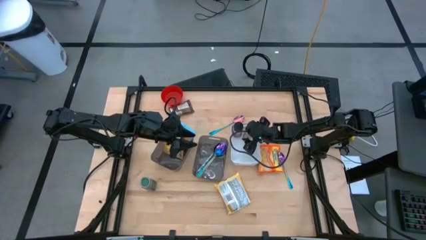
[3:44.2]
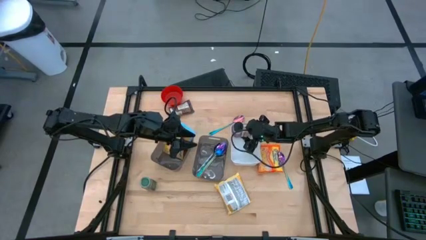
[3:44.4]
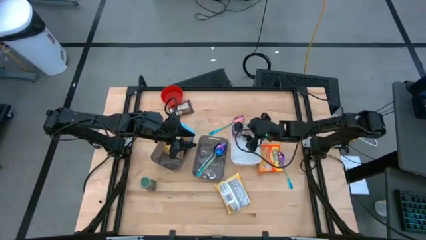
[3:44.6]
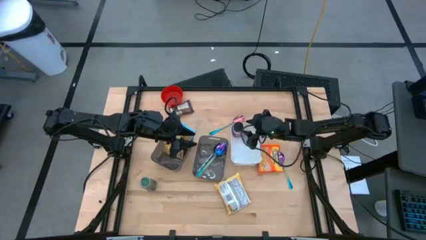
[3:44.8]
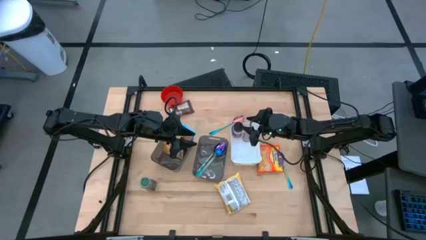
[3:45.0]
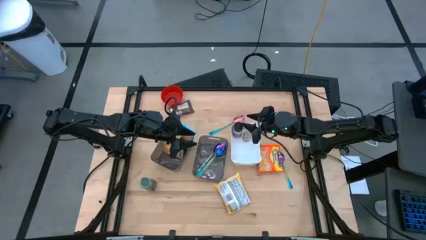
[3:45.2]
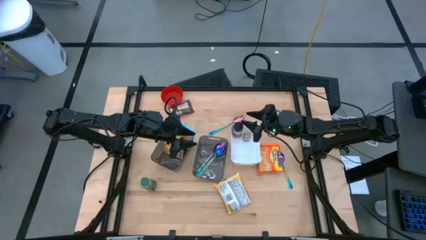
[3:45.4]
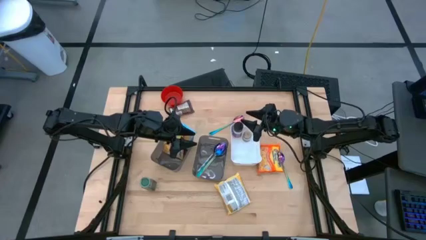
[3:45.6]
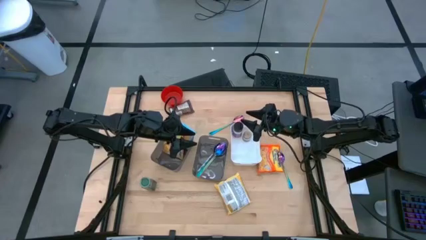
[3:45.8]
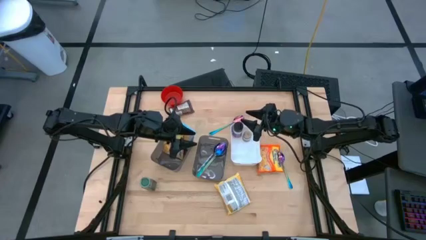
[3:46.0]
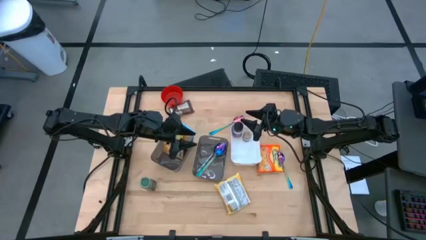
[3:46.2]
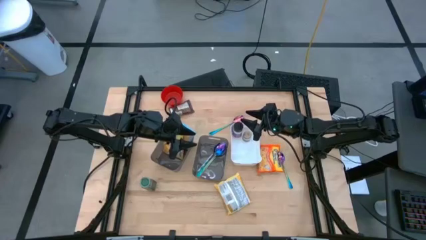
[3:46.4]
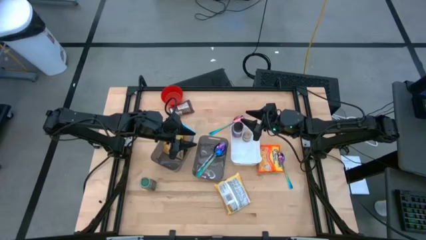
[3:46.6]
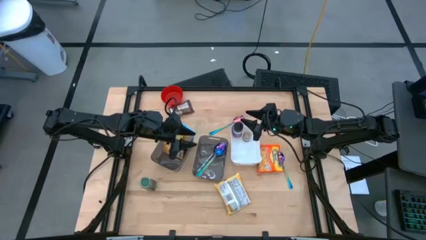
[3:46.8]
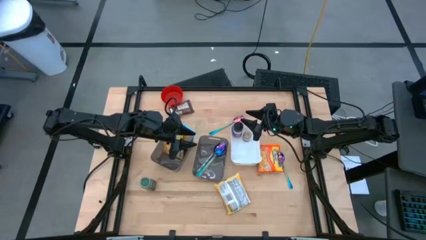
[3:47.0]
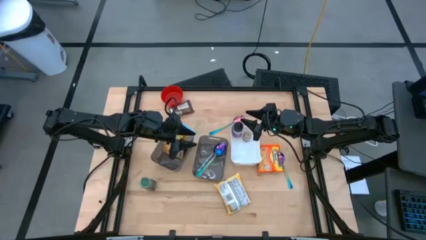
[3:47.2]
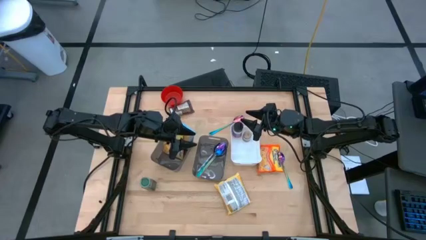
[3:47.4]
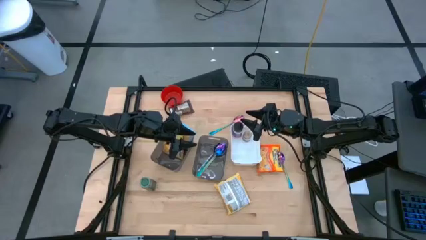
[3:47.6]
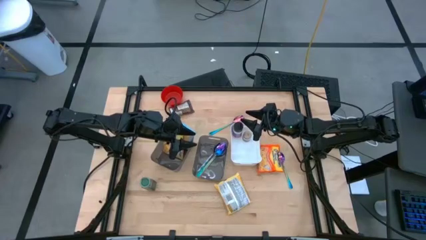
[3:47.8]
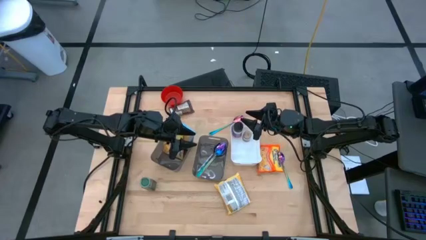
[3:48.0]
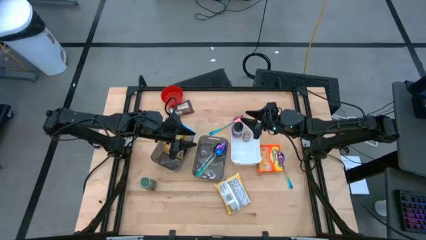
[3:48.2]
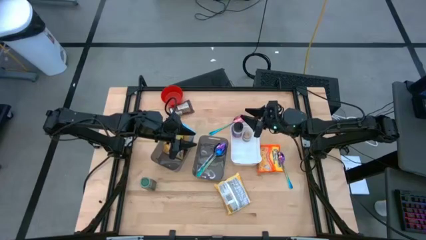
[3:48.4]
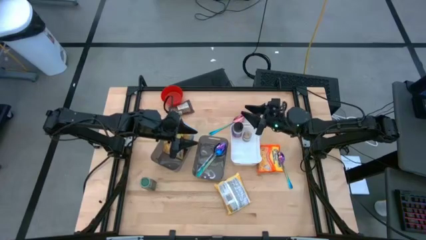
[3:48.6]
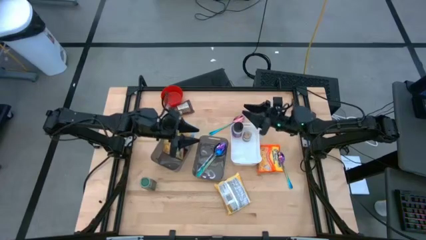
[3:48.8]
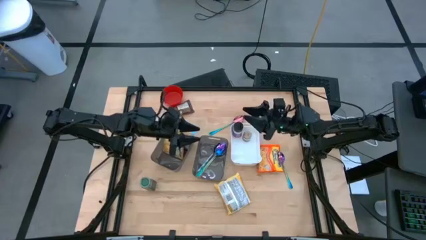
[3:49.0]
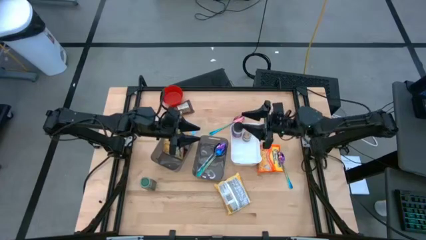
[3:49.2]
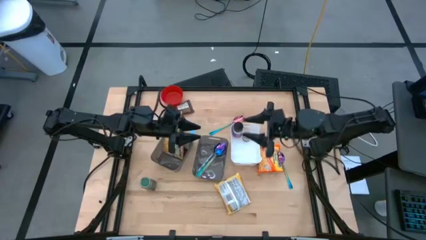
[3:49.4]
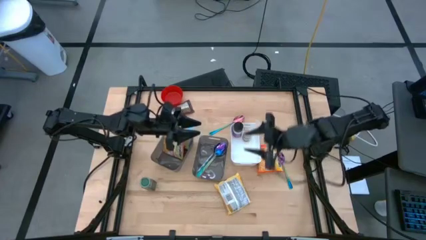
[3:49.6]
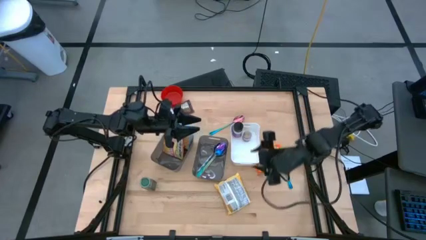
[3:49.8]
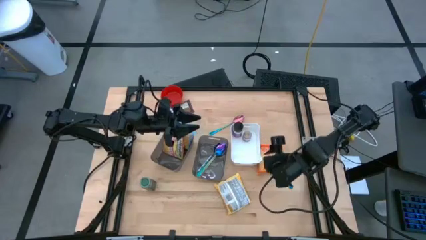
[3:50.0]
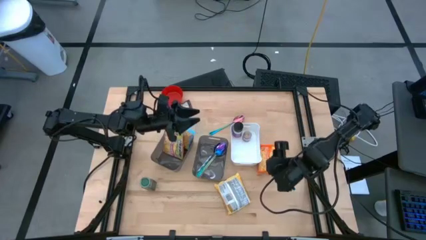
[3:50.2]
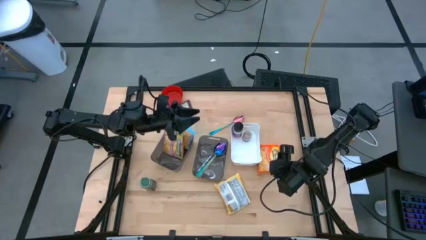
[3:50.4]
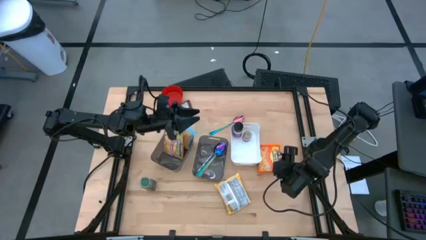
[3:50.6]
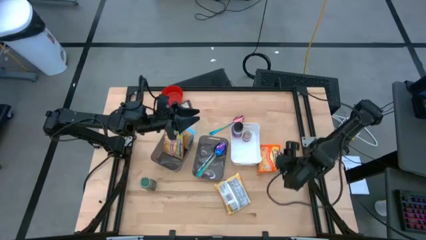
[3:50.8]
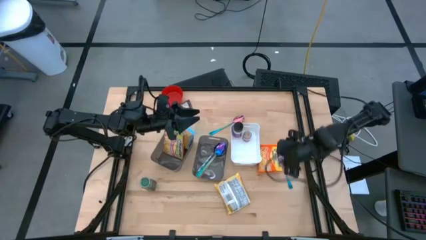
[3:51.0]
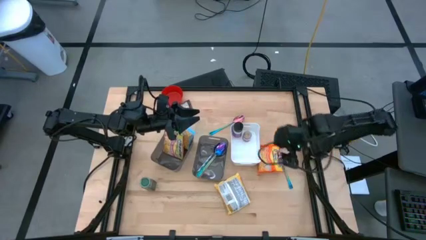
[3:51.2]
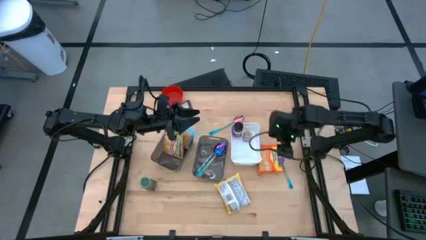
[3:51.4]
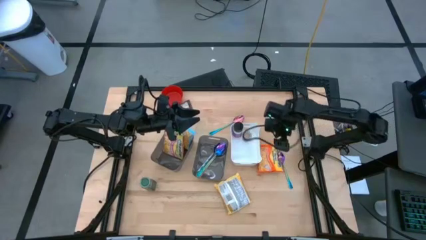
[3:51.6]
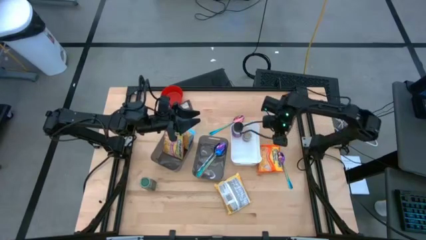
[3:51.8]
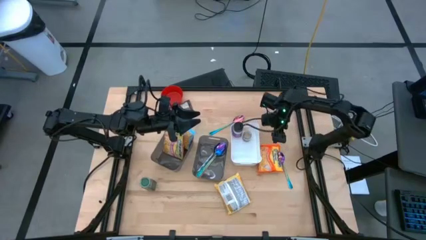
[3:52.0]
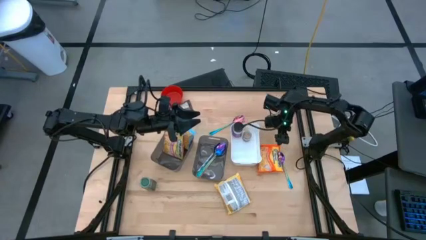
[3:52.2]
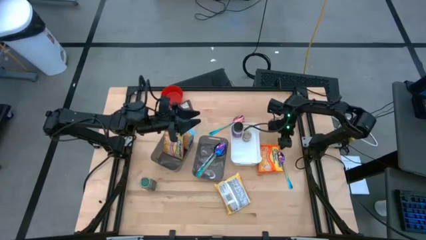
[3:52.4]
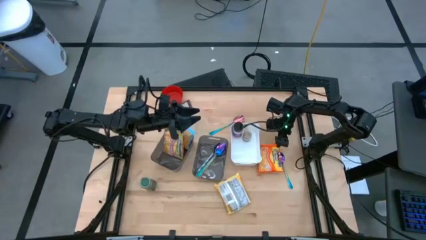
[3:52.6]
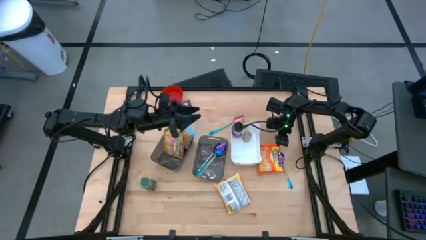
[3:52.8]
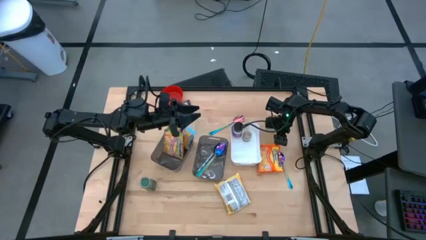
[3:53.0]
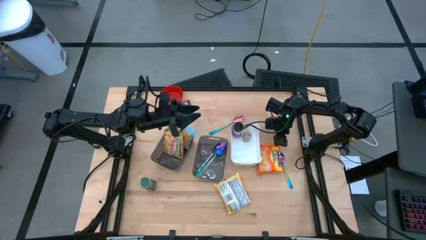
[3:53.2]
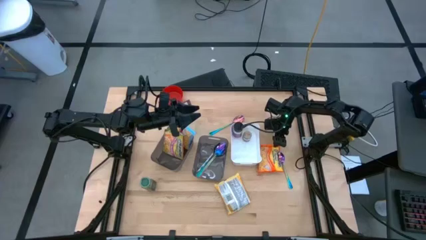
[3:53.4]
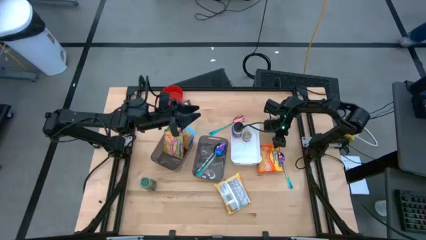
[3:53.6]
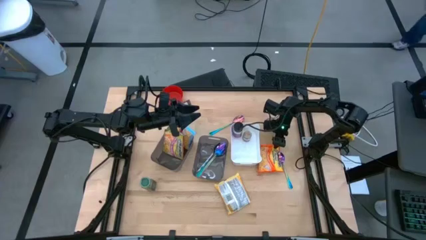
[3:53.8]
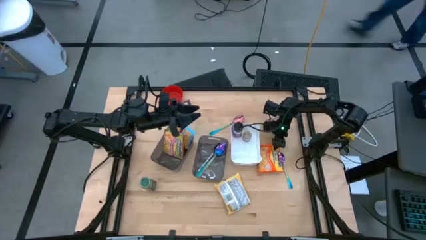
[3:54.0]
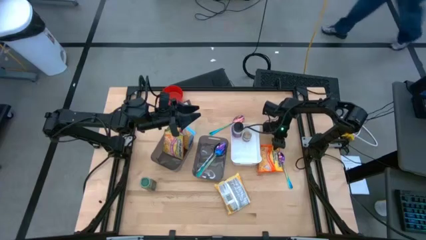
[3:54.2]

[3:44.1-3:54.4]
Task: Pick & Place Food Item
Put the orange pack into the left gray bin

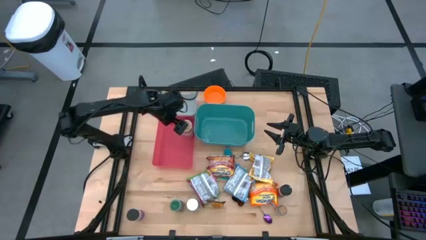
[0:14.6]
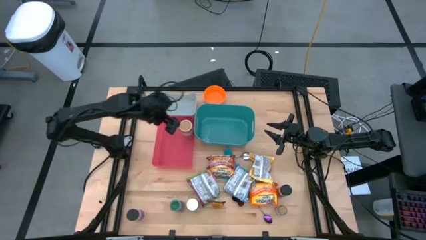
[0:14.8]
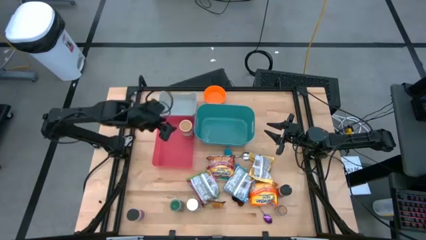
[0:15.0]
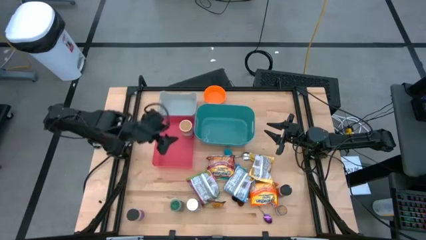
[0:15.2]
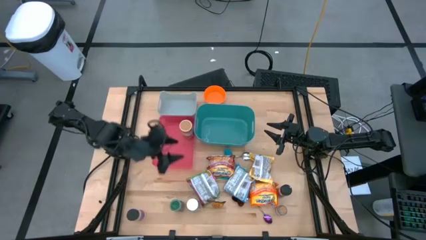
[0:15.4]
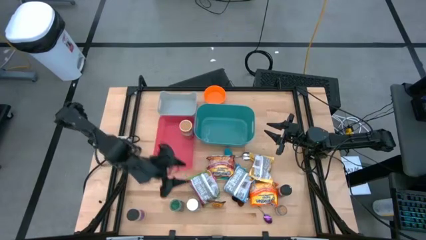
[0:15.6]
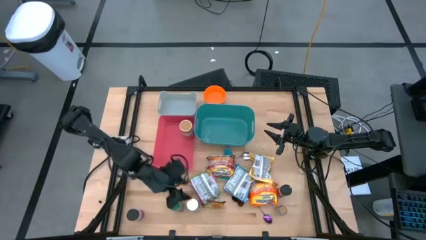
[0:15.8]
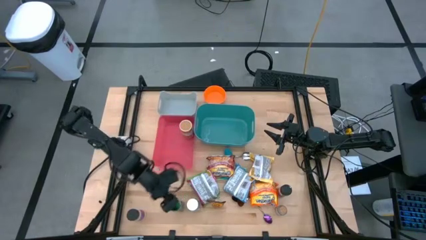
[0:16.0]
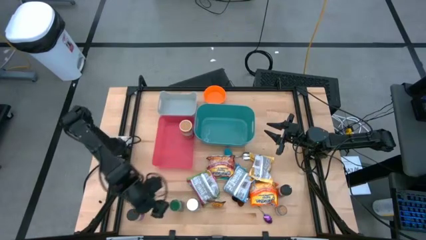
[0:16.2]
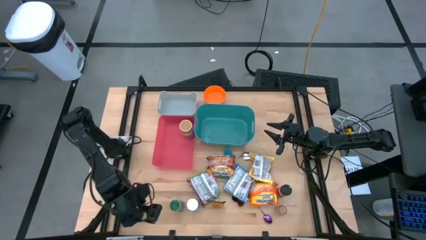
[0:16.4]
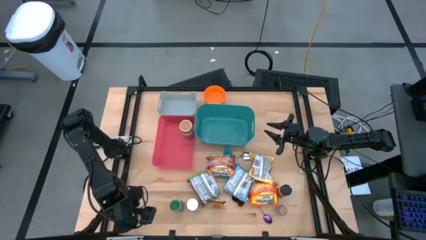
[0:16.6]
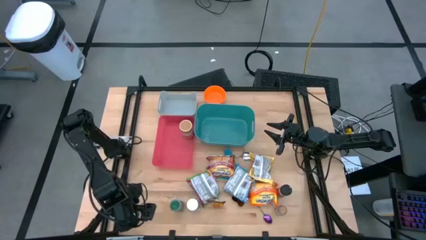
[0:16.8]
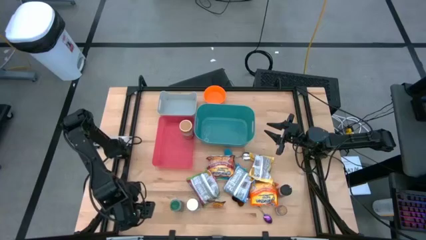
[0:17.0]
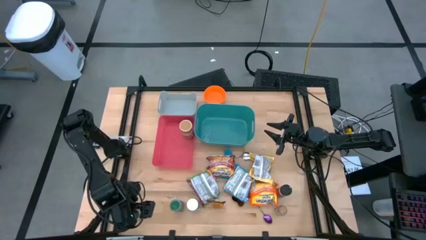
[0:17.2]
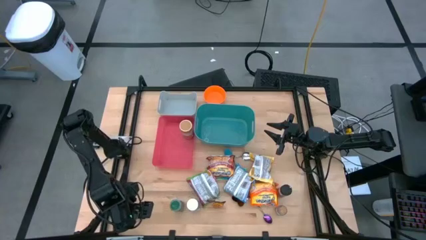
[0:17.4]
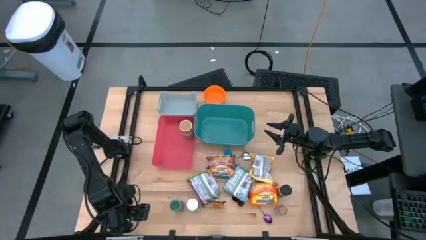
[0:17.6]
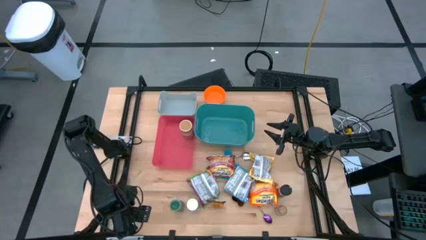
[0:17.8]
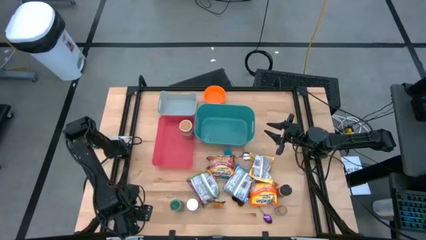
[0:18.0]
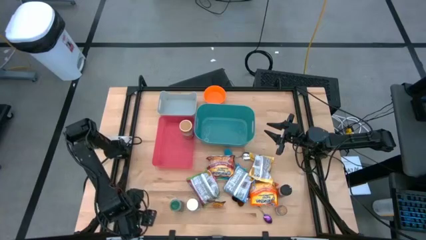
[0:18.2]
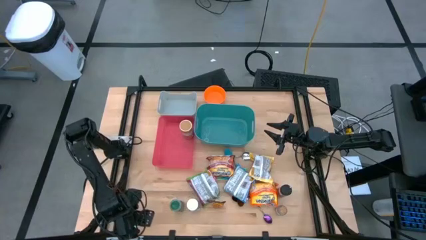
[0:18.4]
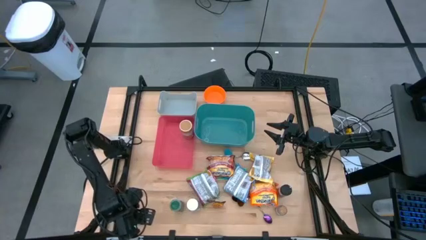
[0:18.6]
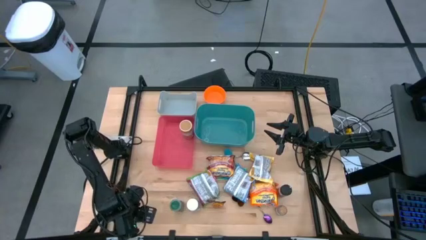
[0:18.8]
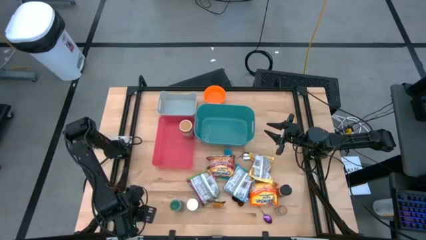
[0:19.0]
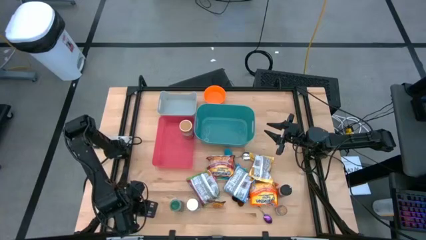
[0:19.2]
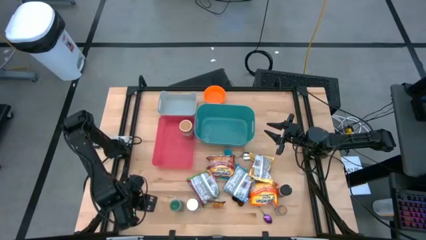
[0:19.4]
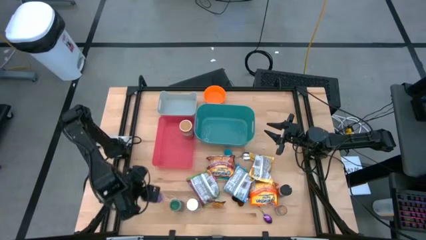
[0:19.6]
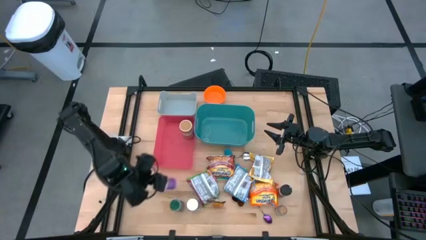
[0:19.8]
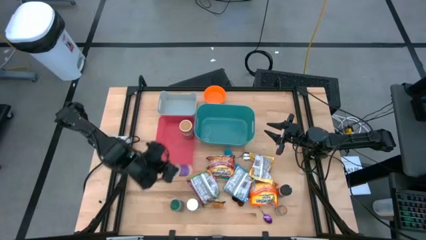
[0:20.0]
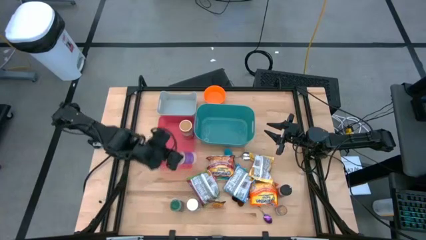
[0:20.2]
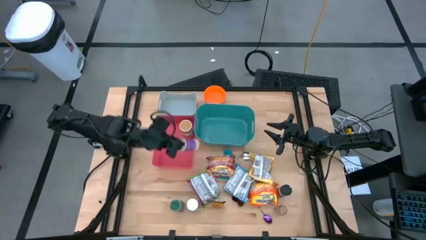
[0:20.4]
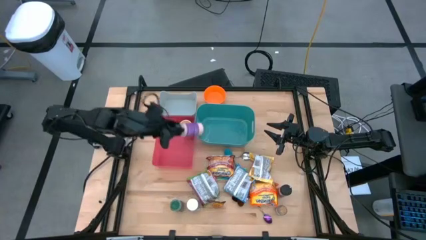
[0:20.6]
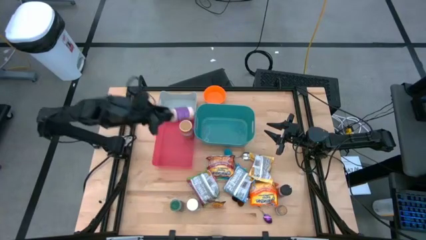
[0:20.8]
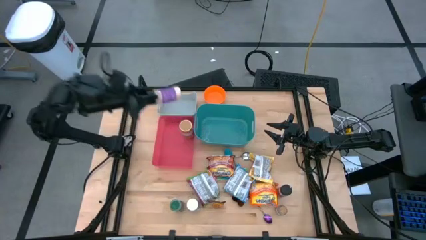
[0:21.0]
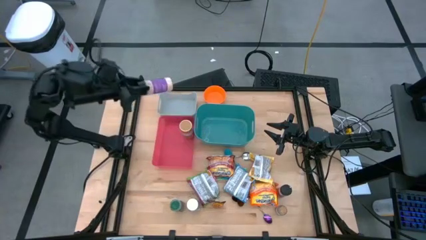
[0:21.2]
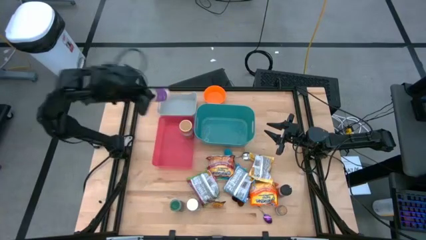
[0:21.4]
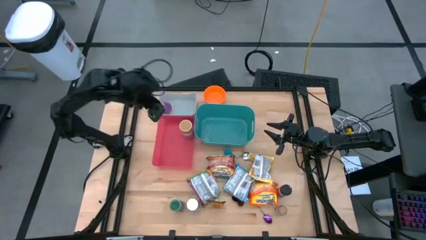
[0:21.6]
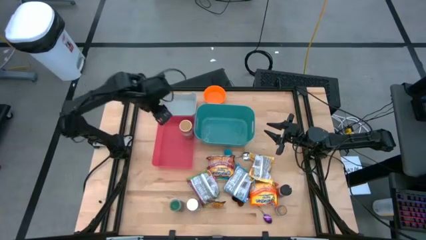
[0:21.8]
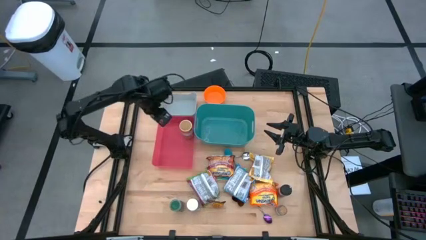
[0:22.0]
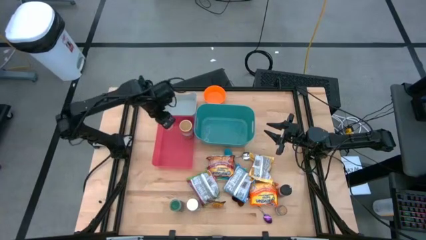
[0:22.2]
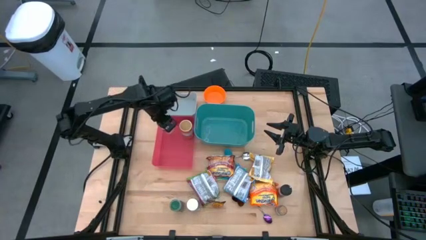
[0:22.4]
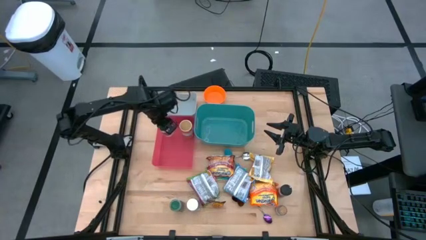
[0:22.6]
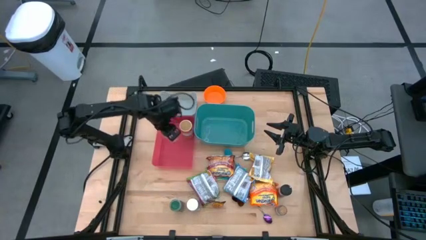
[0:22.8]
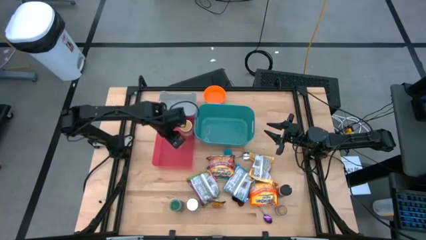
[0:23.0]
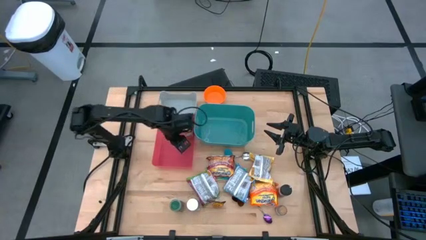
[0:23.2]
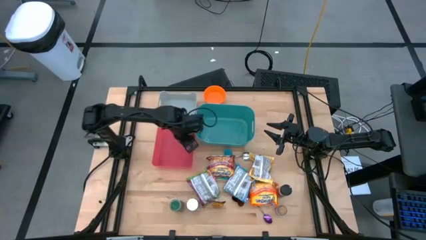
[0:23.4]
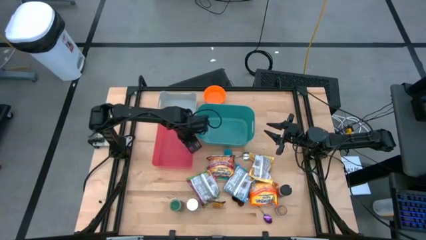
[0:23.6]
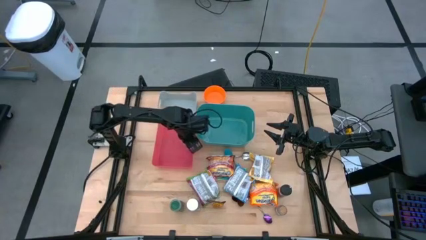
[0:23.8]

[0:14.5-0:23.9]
Task: Pick & Place Food Item
Put the violet spice bottle into the red bin
